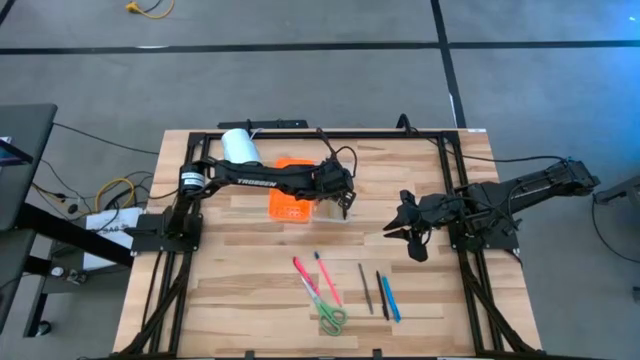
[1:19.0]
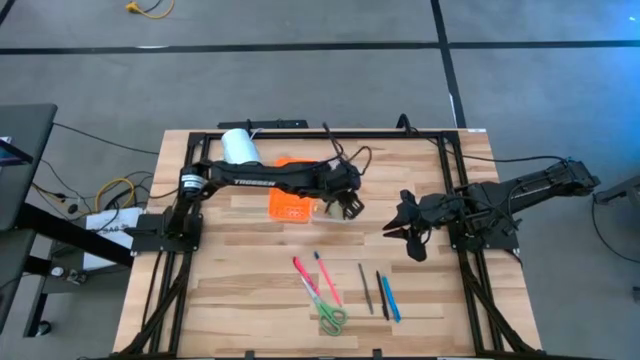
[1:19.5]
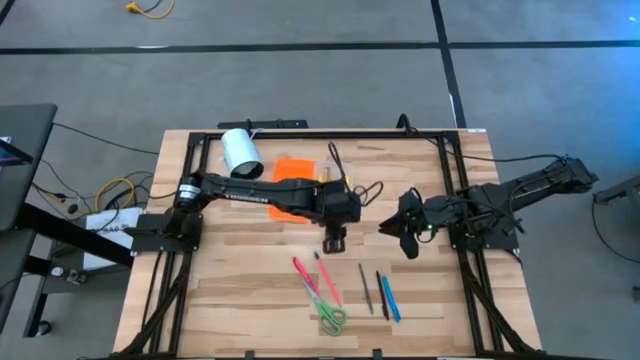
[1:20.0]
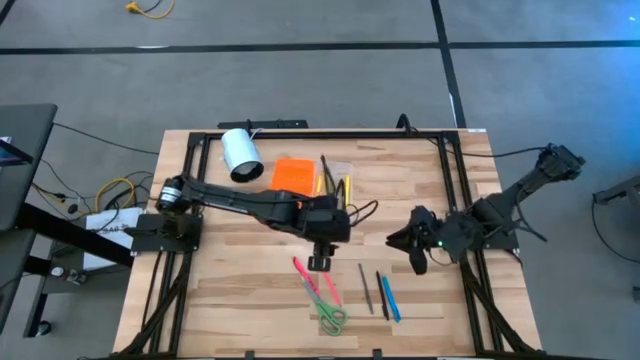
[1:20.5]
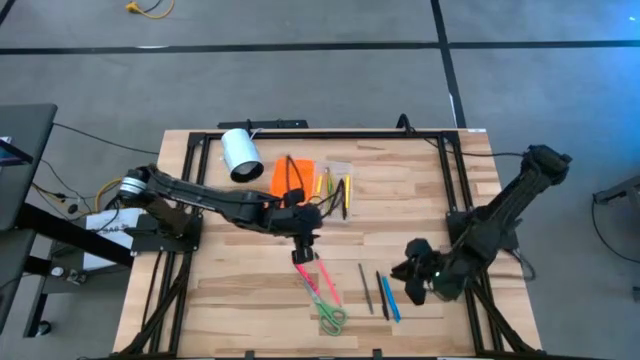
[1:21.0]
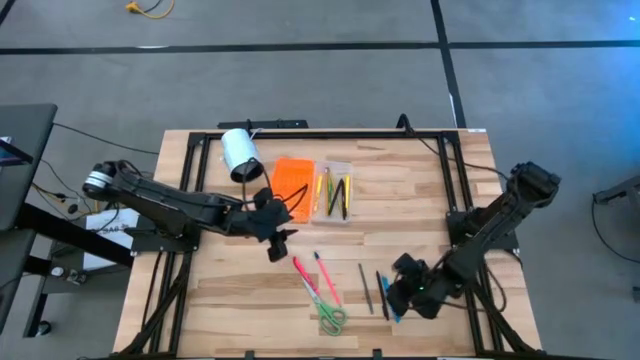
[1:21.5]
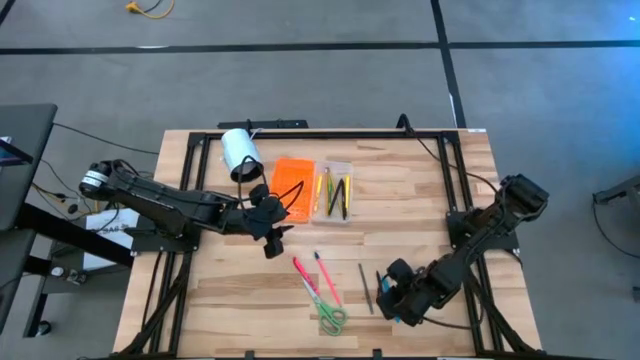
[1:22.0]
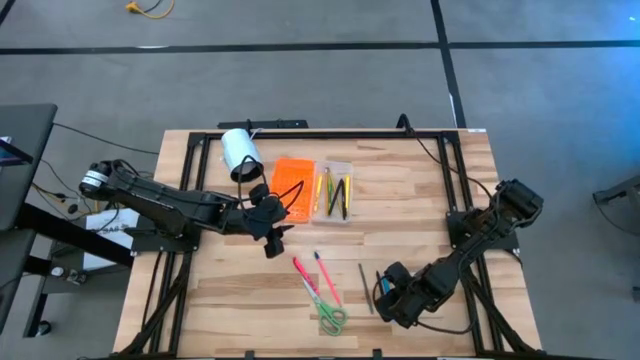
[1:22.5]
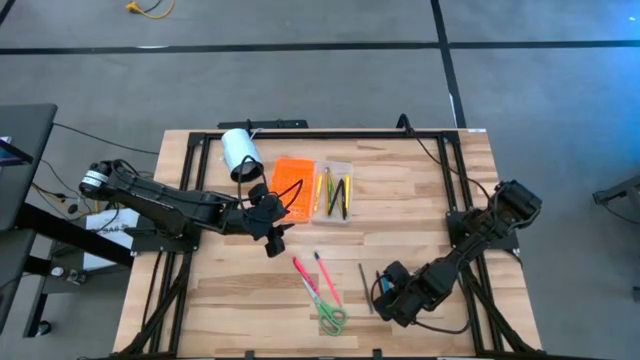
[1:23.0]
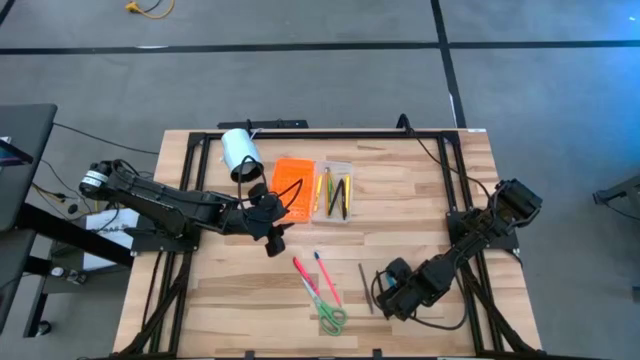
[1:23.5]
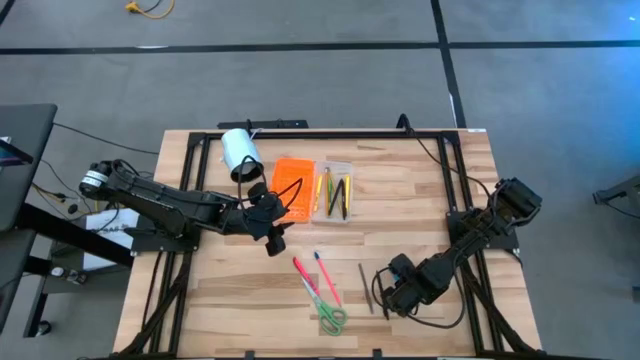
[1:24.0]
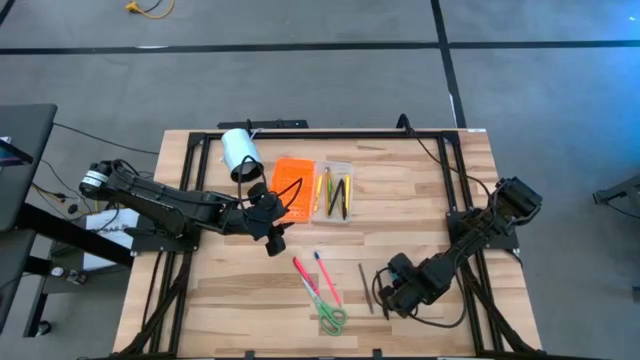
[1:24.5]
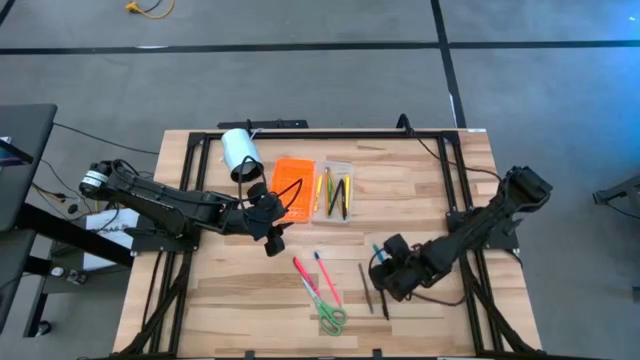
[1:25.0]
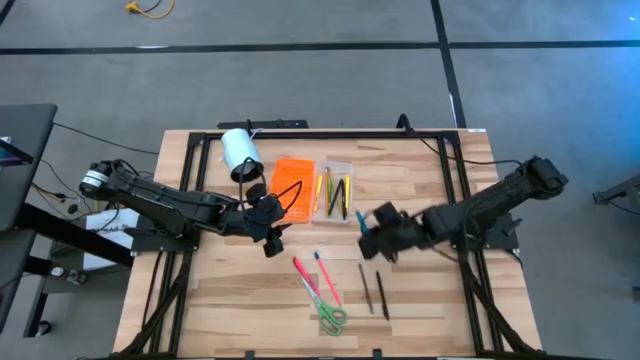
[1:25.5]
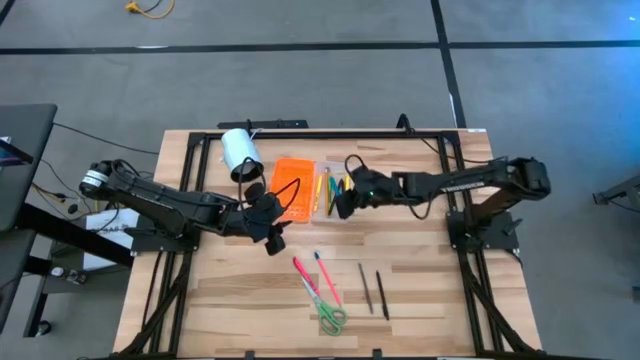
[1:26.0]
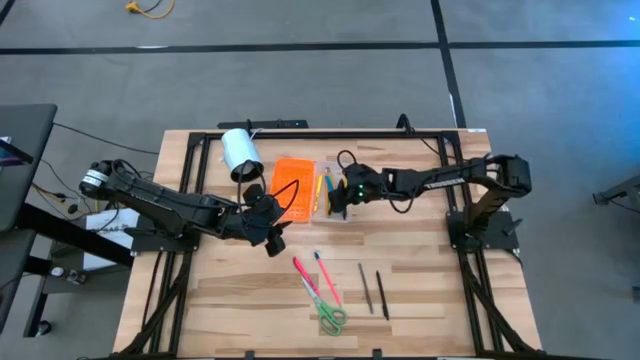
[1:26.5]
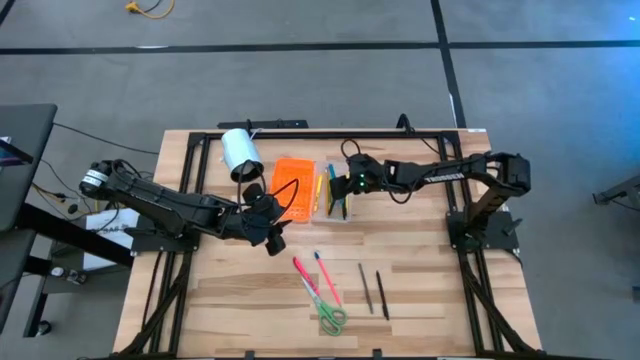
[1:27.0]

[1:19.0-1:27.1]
Task: Pick & place school supplies into a supply box
Put the blue pen into the orange supply box

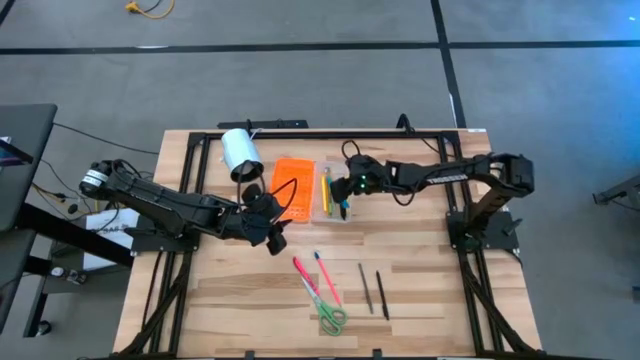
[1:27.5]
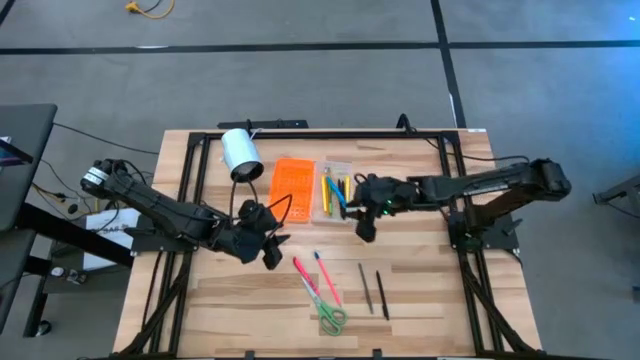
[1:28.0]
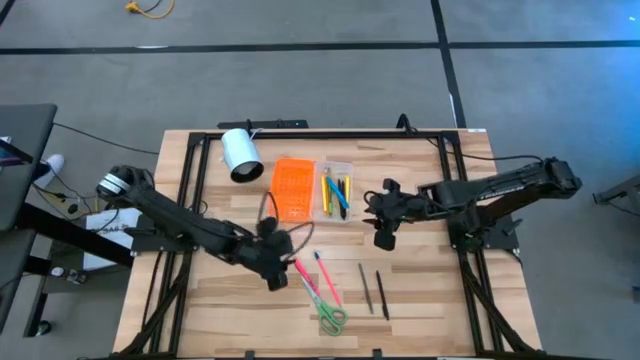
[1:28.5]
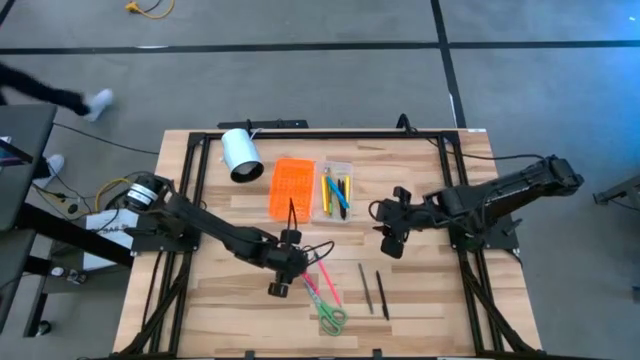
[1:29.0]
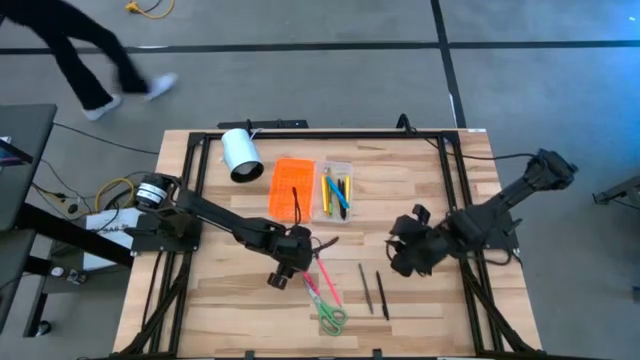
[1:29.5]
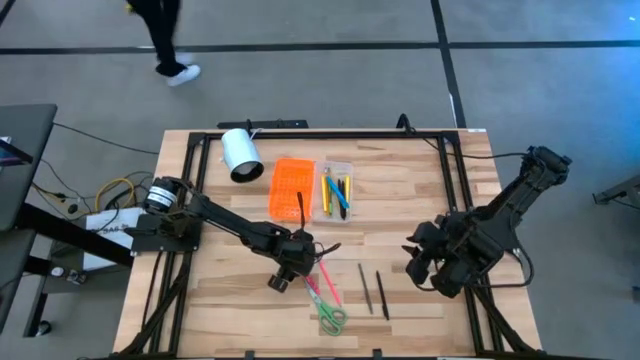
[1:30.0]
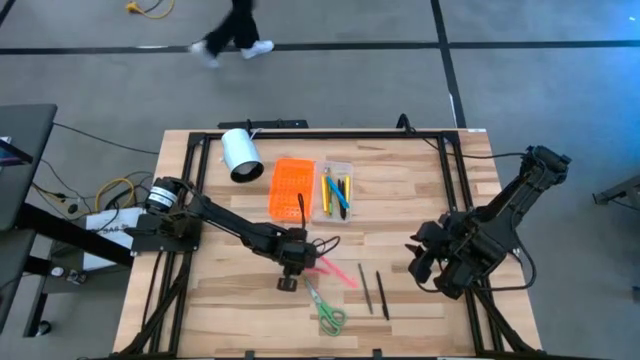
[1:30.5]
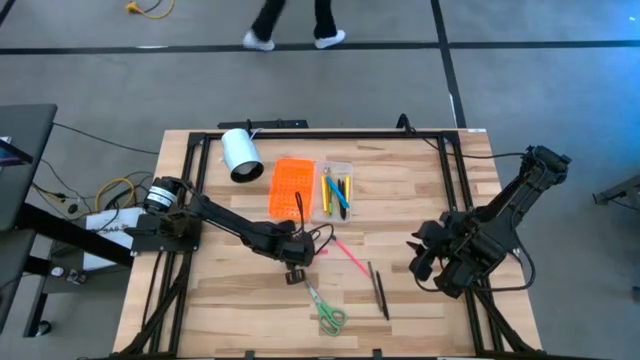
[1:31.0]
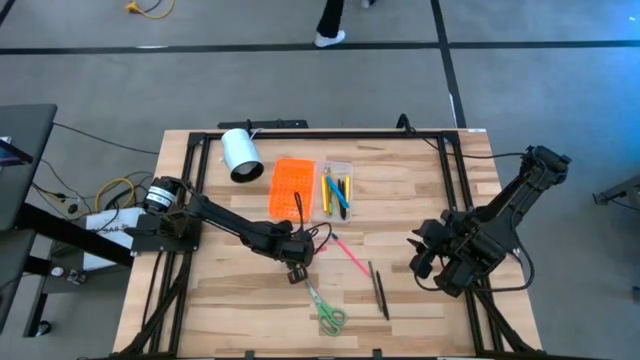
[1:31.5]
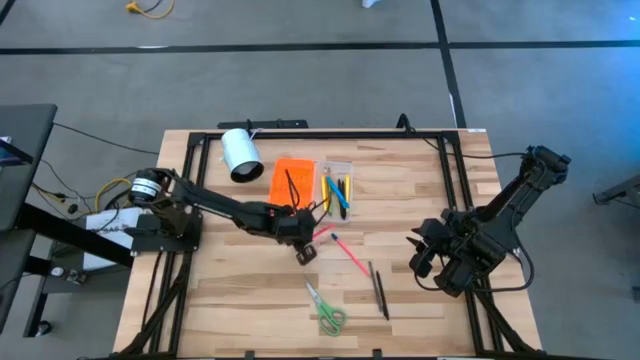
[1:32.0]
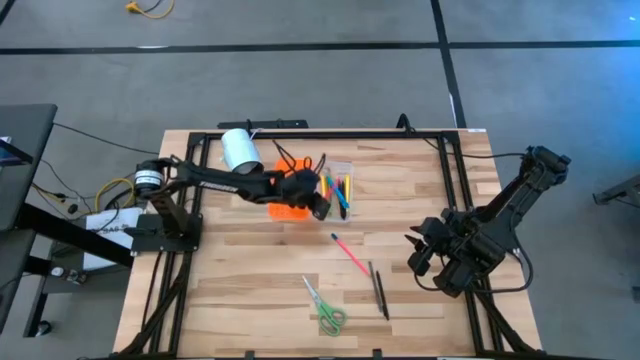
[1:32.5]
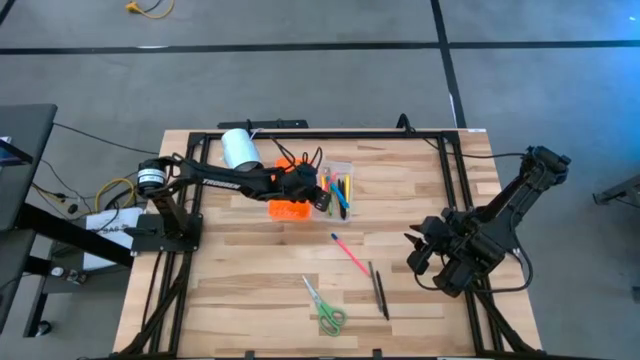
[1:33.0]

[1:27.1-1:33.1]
Put the pink pen into the orange supply box

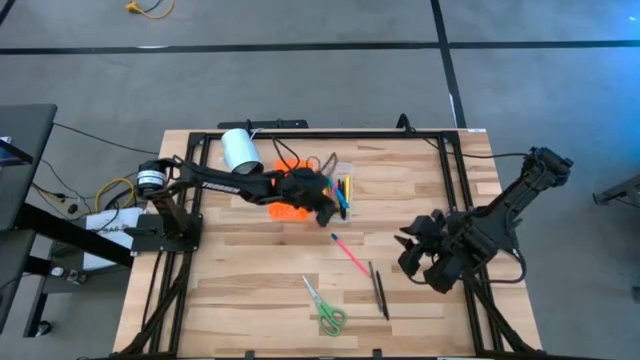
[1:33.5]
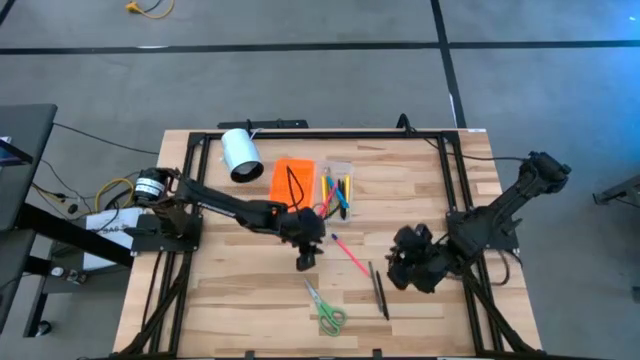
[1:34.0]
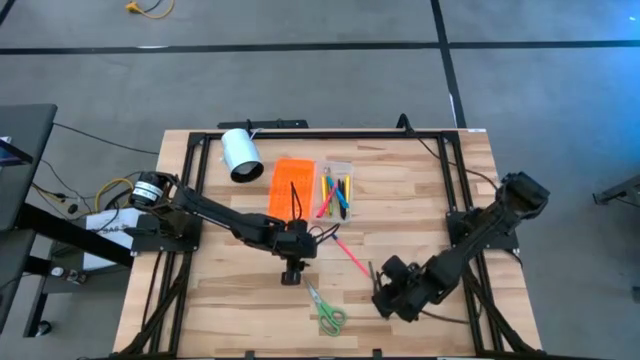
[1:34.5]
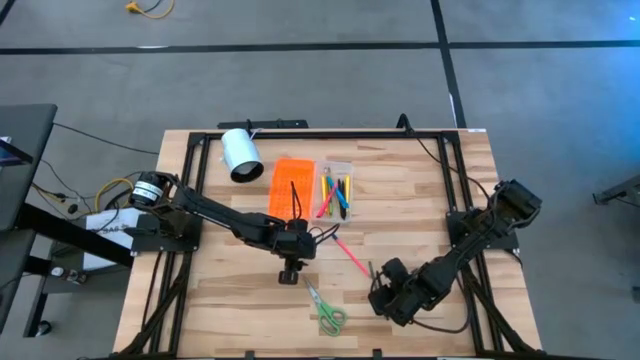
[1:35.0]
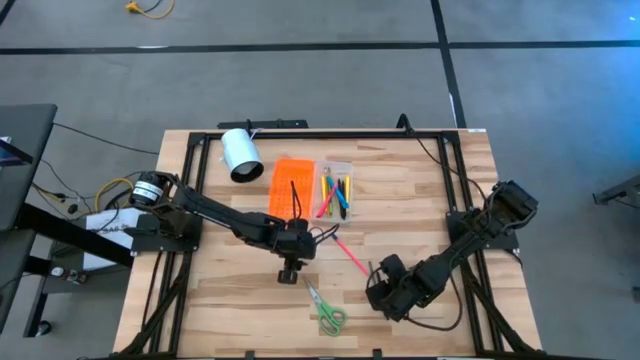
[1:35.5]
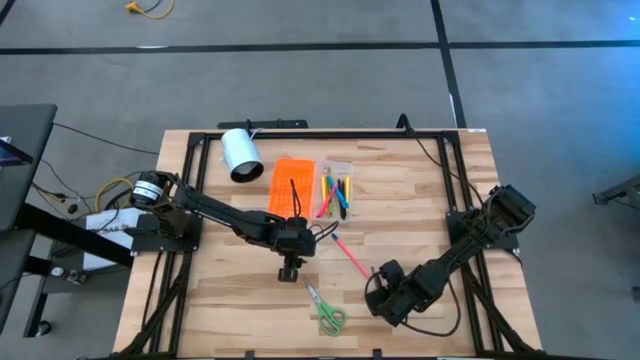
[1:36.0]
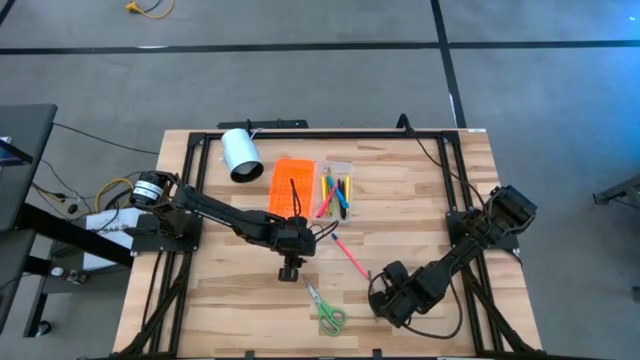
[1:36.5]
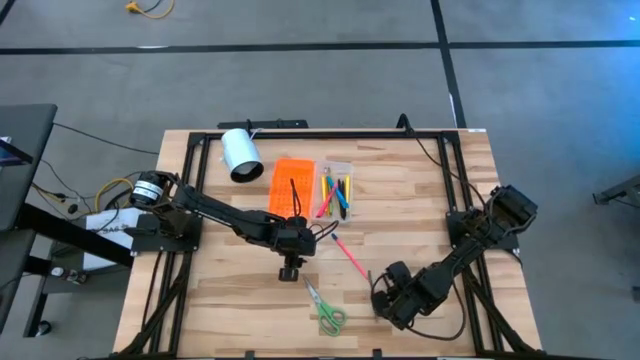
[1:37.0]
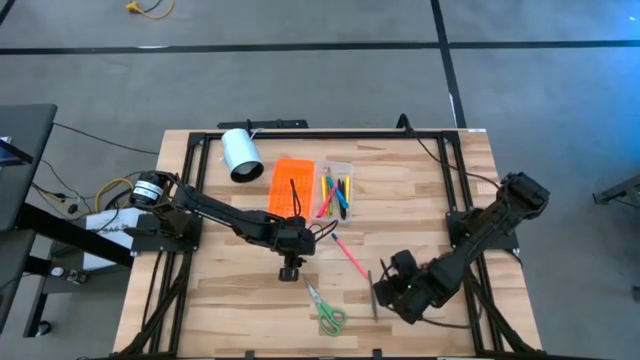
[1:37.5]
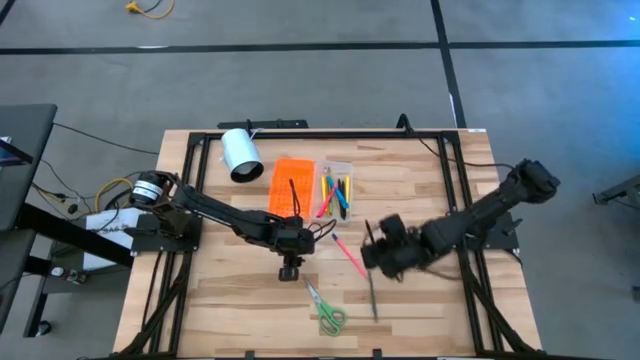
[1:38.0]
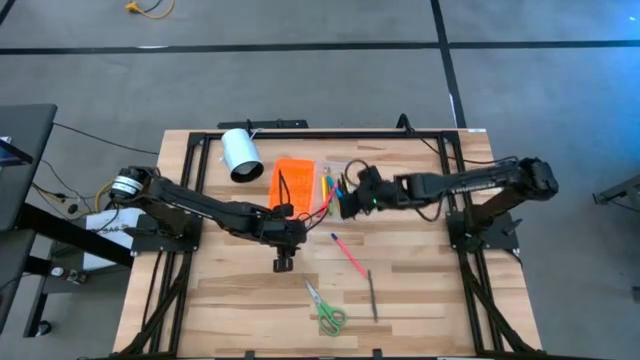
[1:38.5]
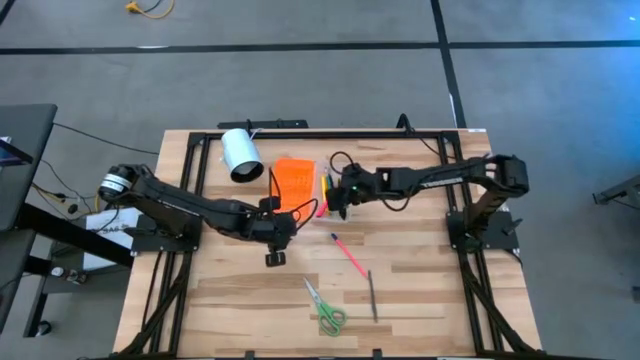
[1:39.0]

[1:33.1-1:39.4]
Put the black pen into the orange supply box

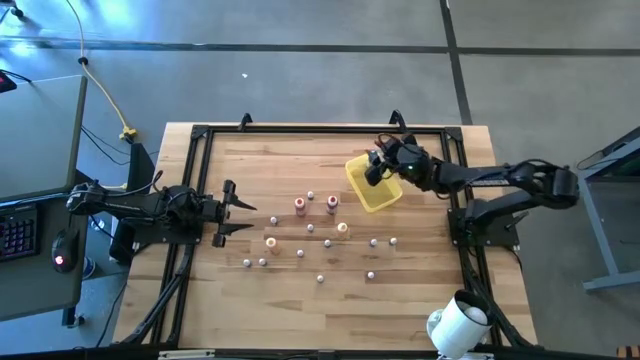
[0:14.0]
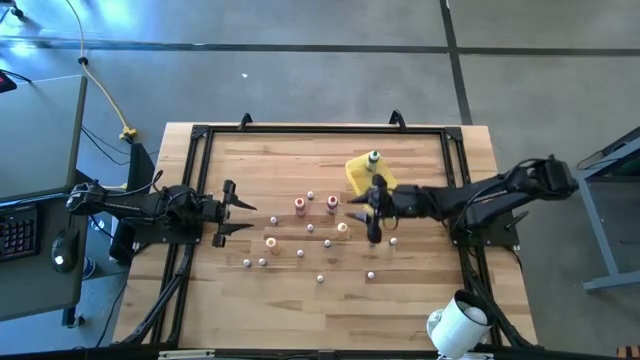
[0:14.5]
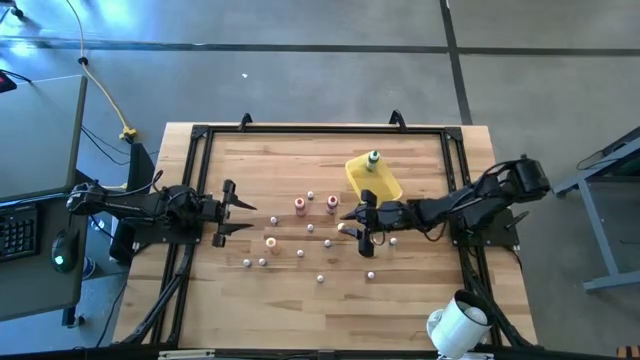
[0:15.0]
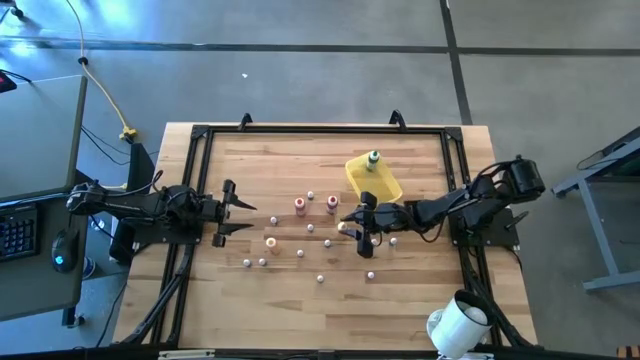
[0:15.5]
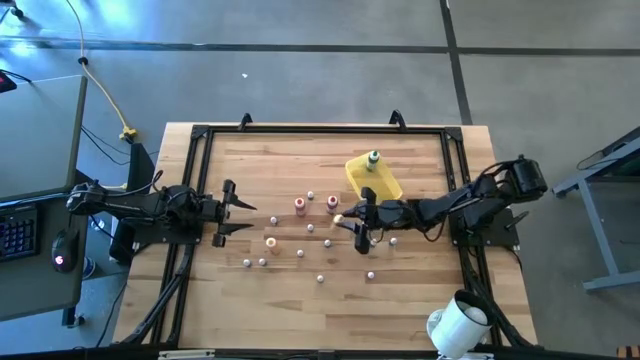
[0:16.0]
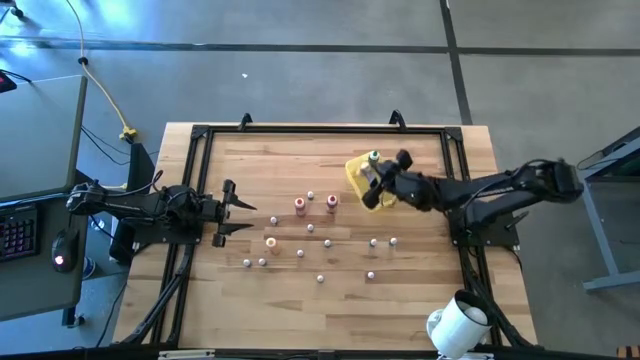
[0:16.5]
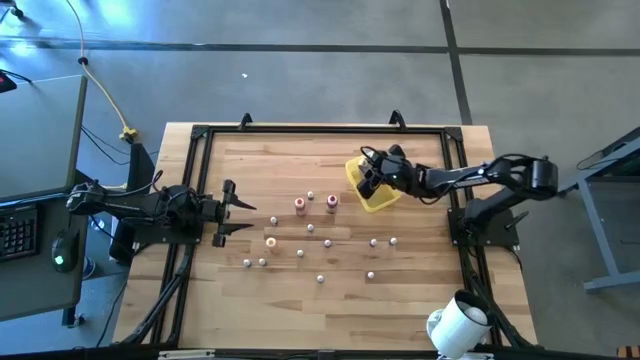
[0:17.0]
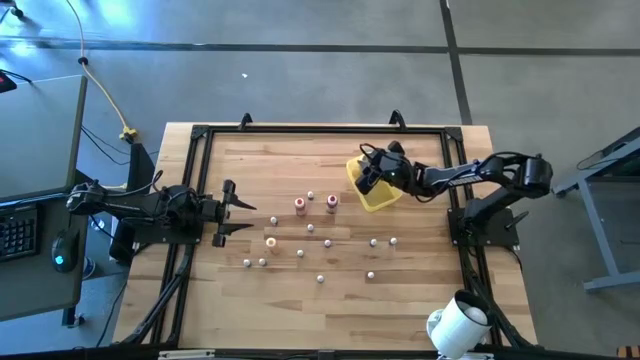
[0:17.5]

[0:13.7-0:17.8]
Task: Pick & Place food coloring
Put the large yellow food coloring bottle into the bin
